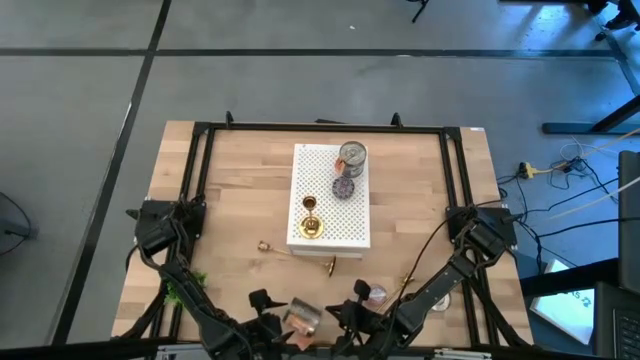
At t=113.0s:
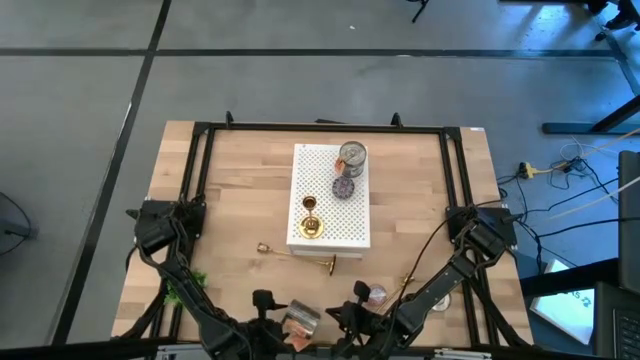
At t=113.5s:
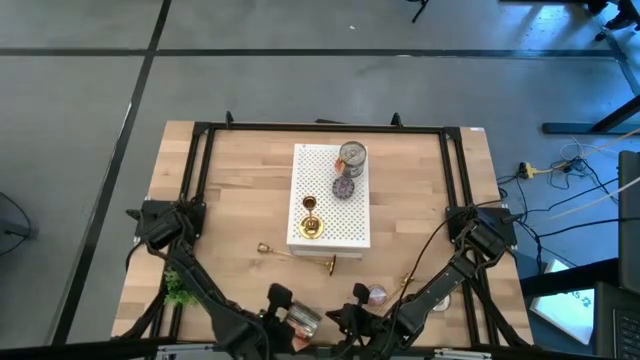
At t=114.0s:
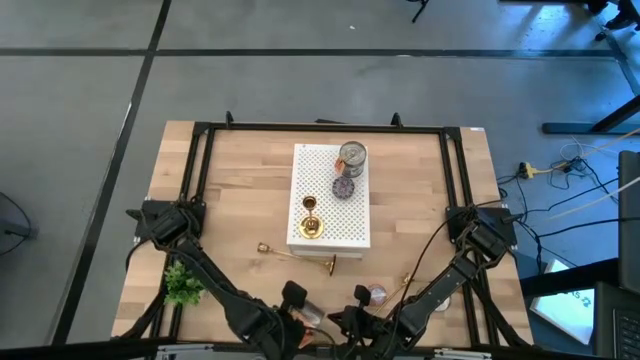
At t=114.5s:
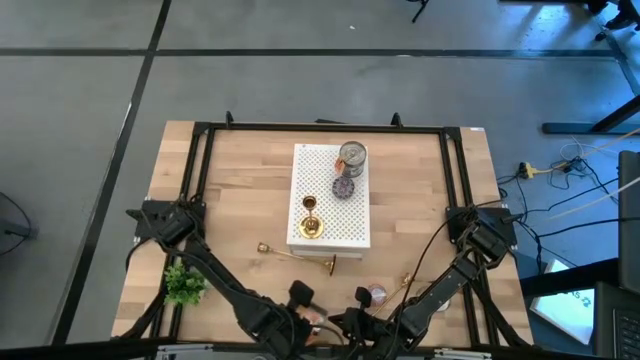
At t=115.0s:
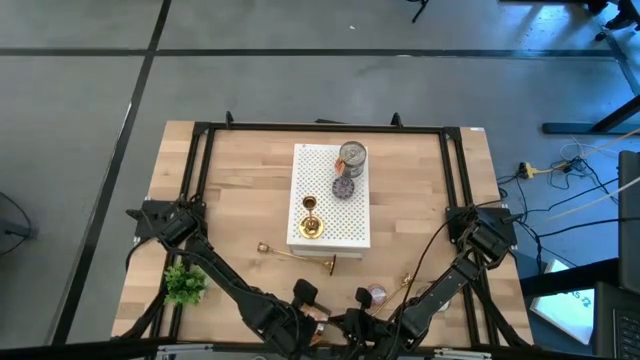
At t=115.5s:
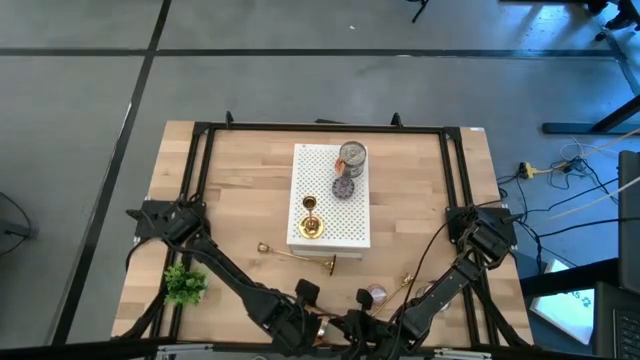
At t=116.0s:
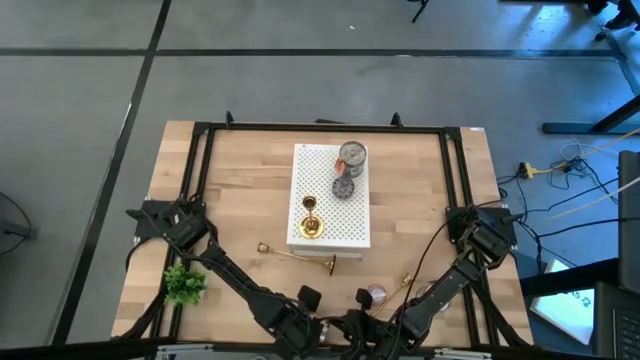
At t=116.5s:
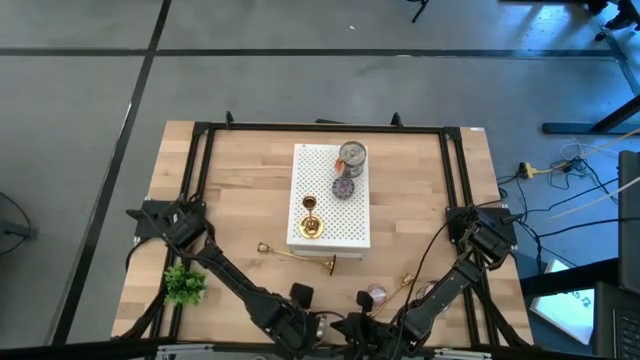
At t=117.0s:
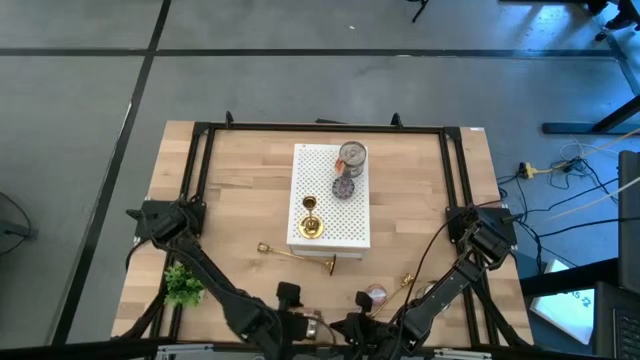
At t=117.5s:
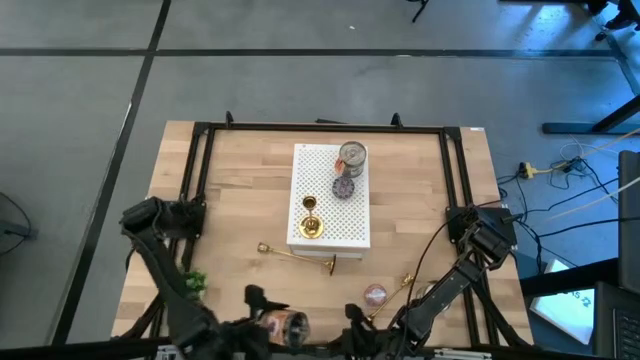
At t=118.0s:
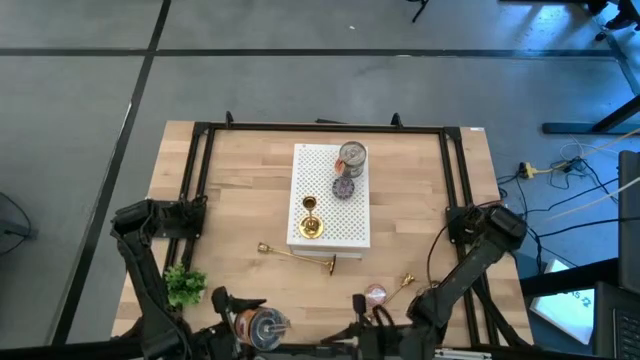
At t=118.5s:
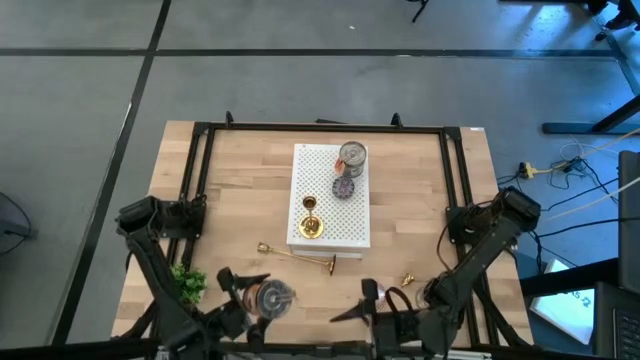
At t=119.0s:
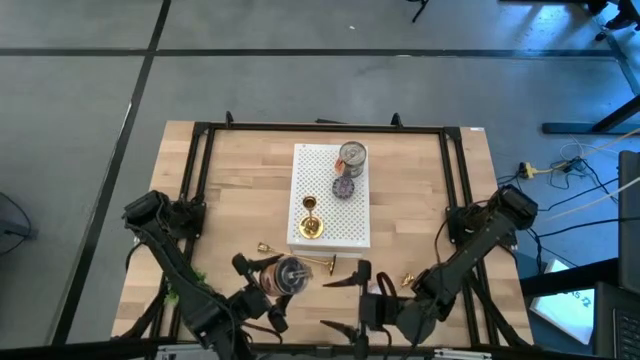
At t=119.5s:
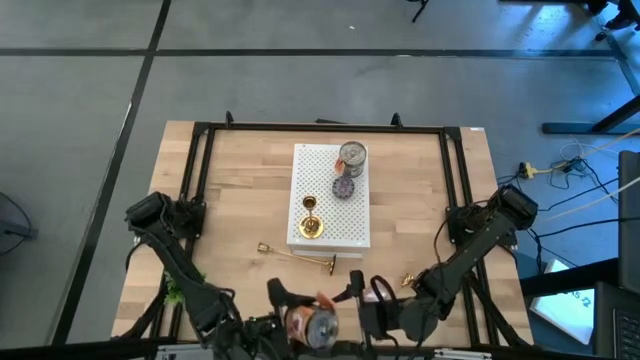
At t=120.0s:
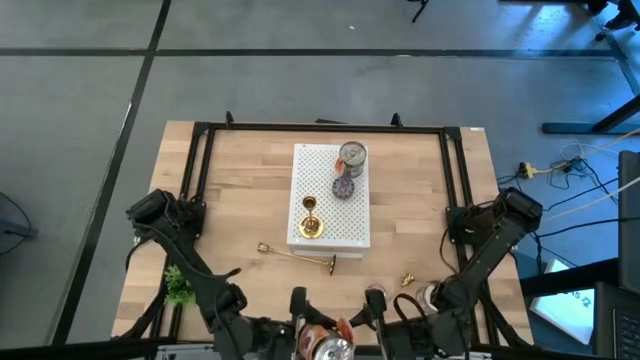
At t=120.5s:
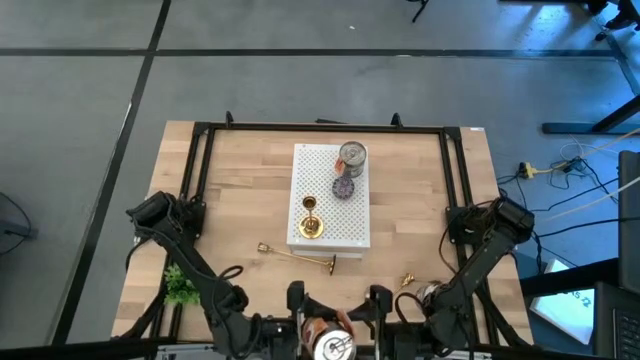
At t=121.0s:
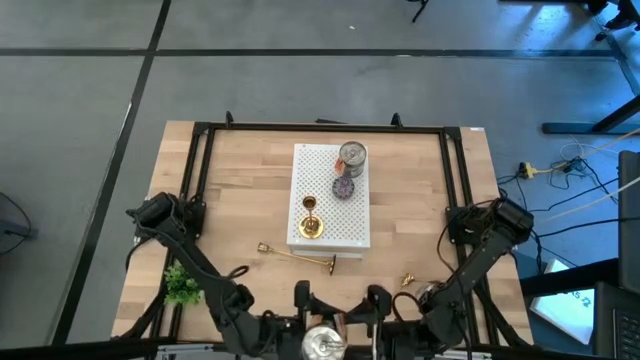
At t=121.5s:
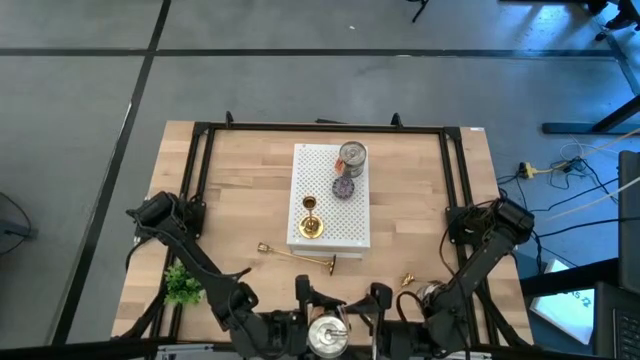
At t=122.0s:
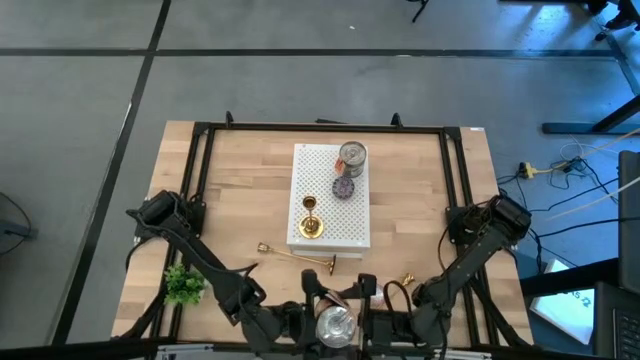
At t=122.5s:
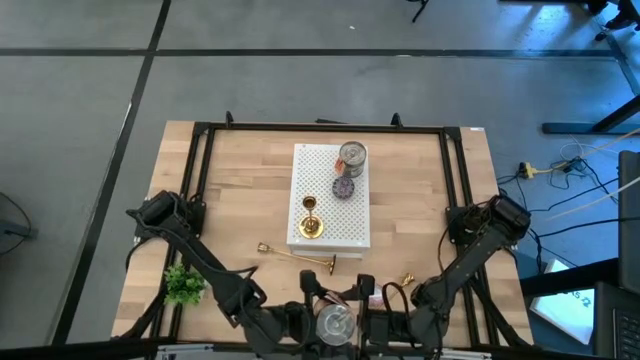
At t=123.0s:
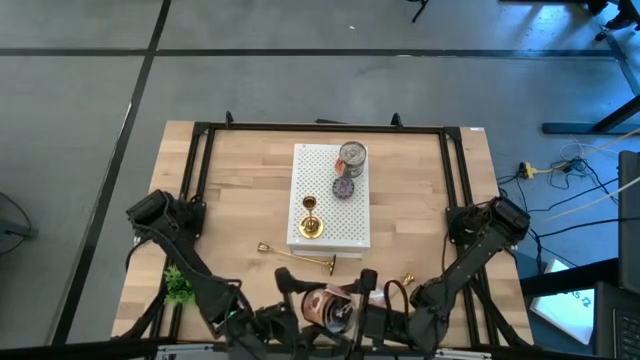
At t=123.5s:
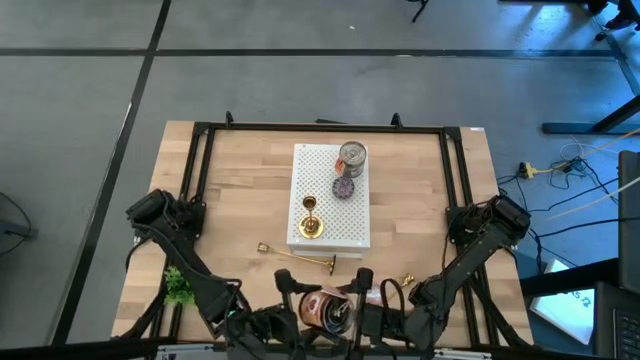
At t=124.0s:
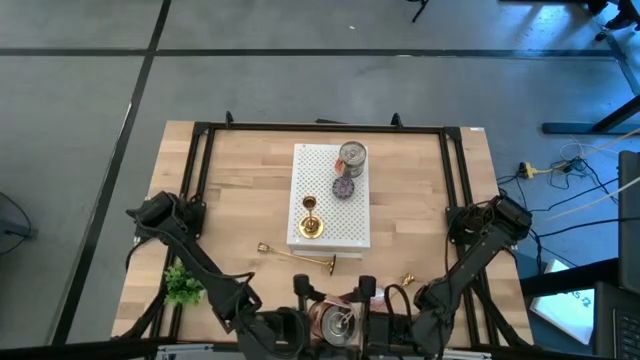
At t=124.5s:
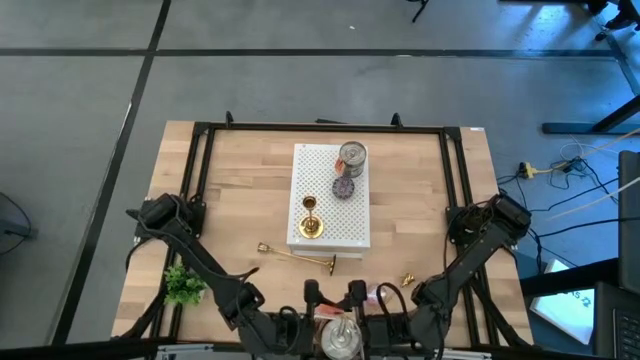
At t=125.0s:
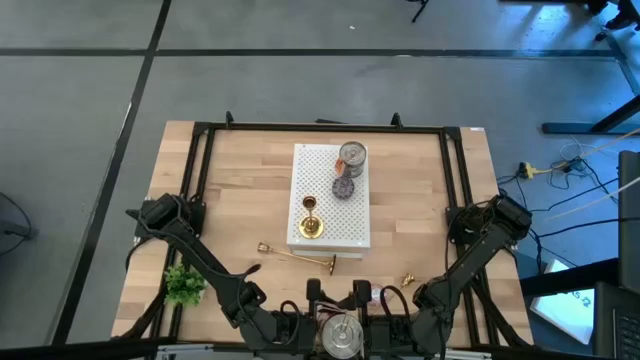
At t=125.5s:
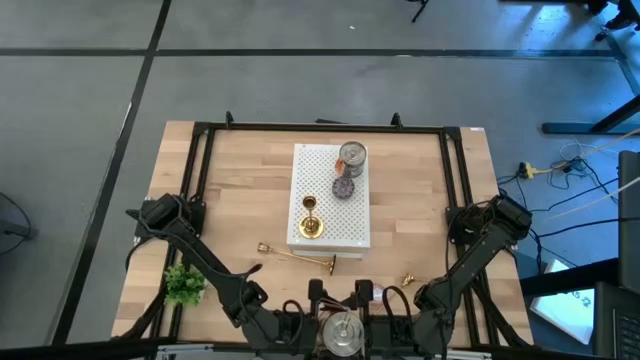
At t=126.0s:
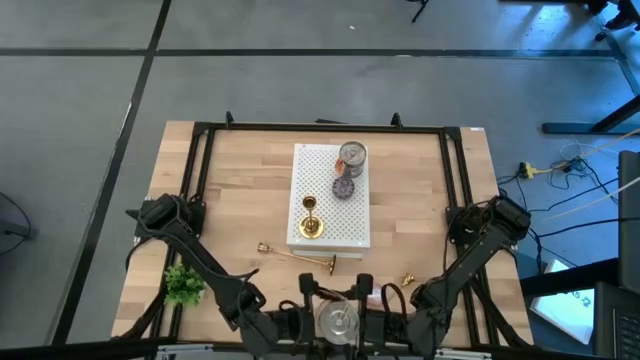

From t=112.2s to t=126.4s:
Task: Pick & Place candle stick holders
Put the left silver scented candle on the shelf

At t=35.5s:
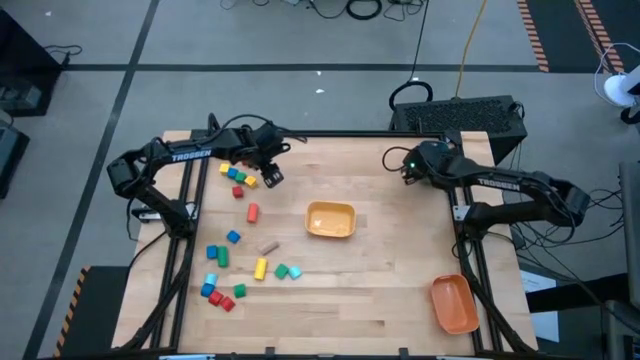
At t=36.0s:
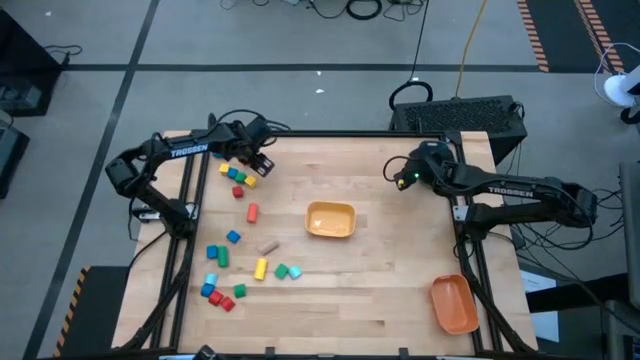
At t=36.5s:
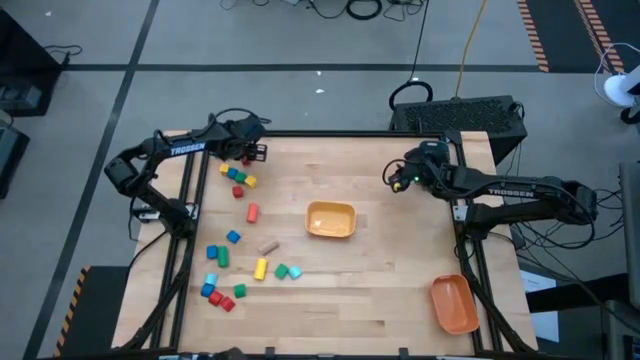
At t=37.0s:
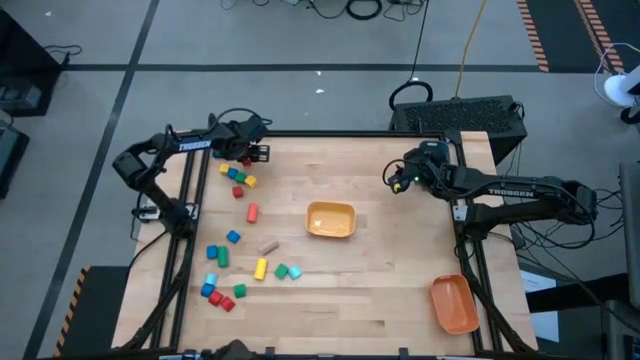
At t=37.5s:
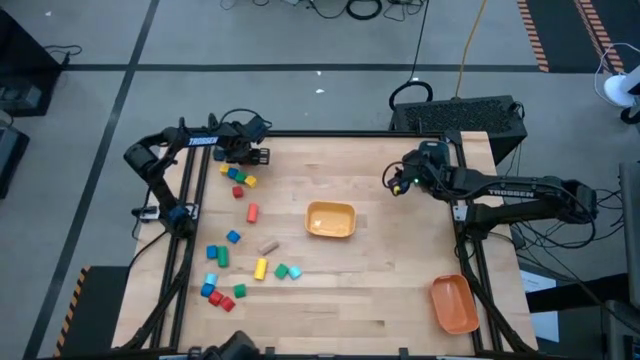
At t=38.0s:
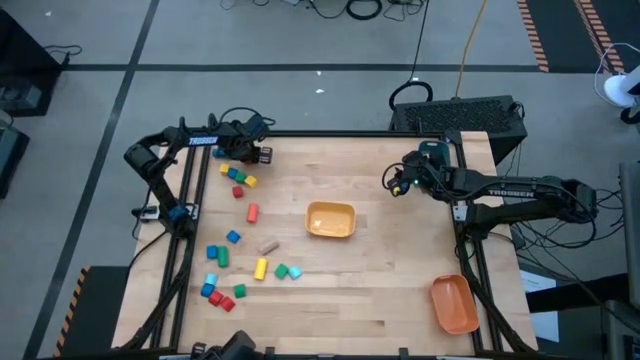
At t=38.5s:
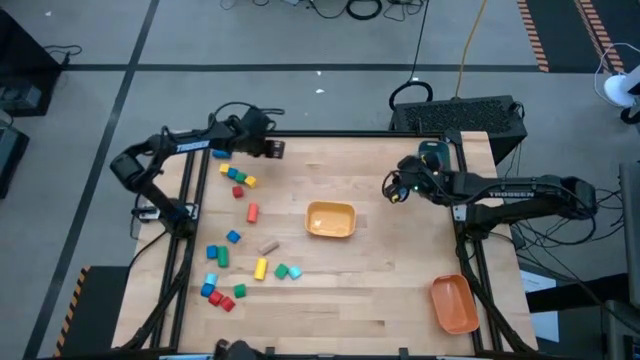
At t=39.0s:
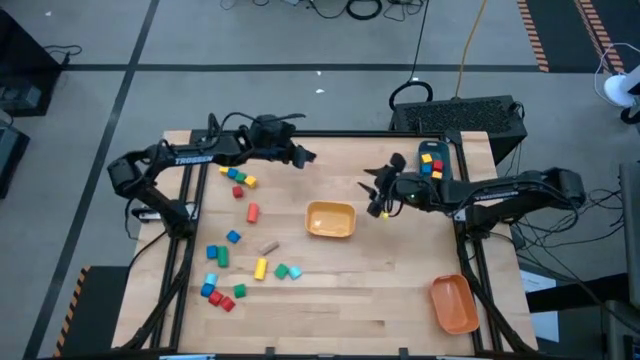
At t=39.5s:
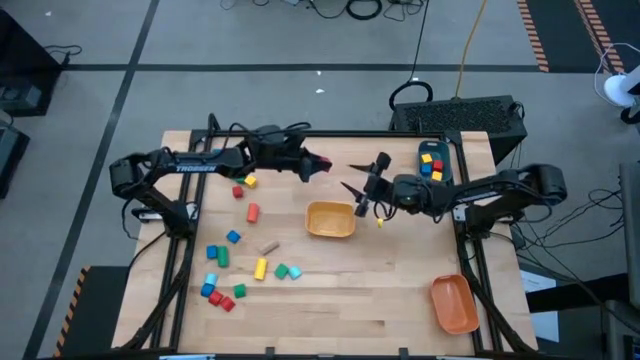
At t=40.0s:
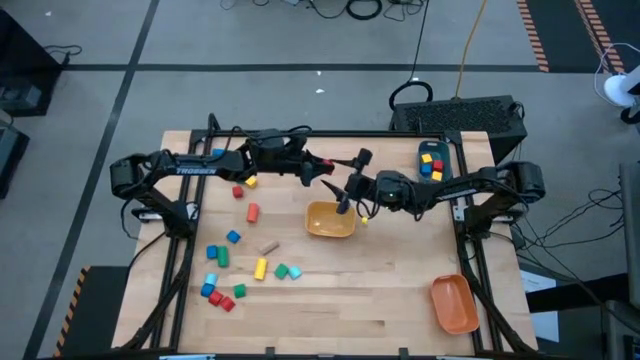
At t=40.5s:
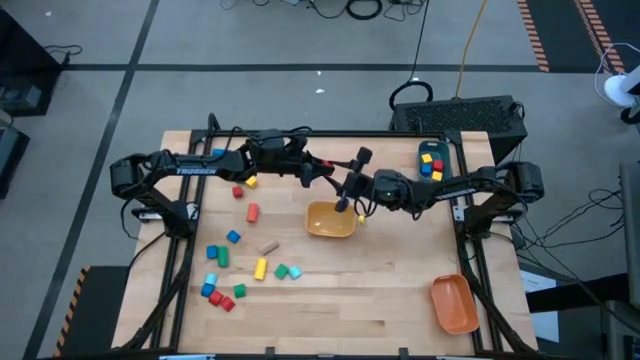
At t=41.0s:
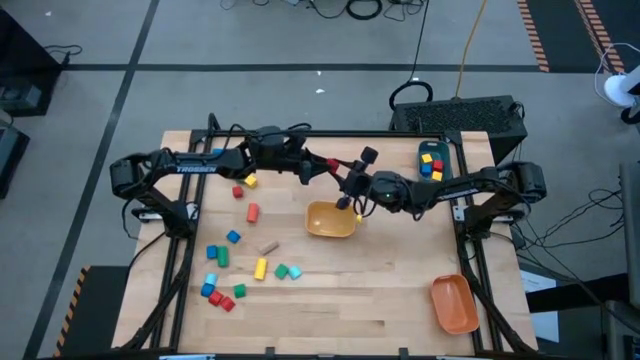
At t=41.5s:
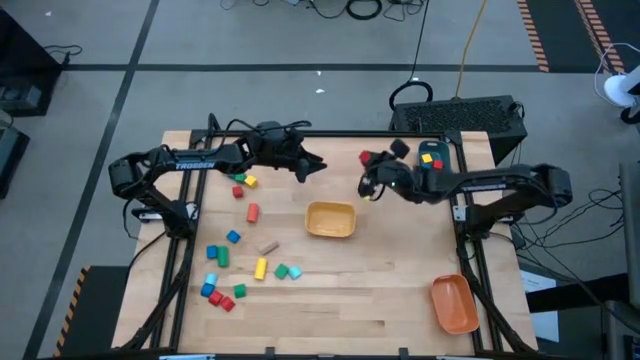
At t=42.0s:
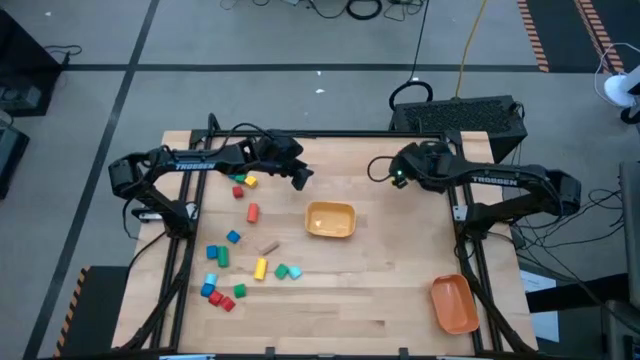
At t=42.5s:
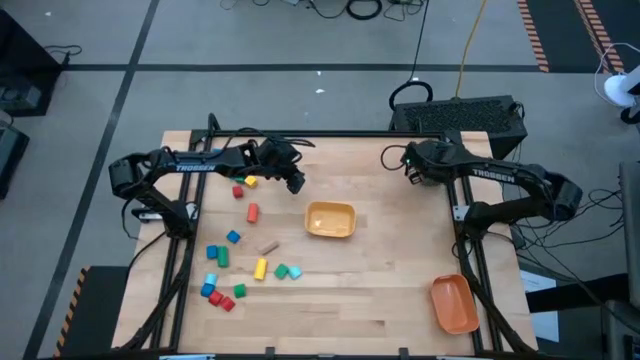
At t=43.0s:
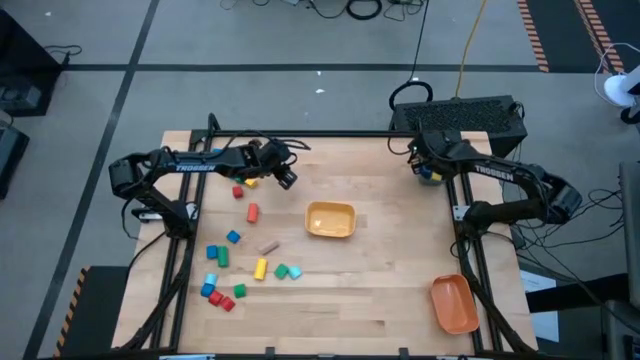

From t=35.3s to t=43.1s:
Task: Sort blocks by size
Put the red square block into the blue bin
